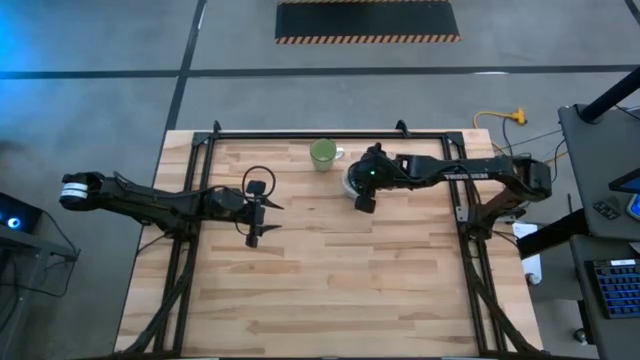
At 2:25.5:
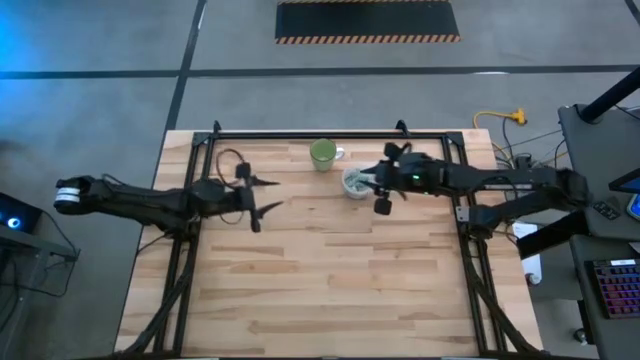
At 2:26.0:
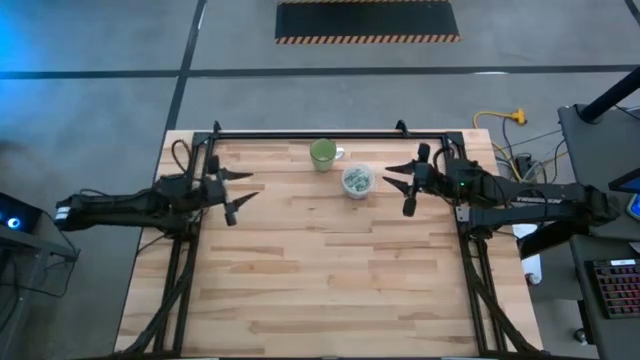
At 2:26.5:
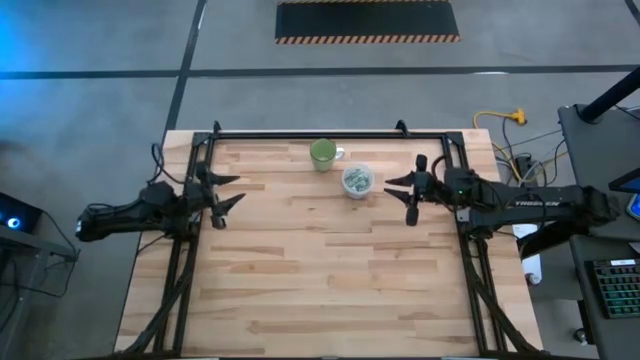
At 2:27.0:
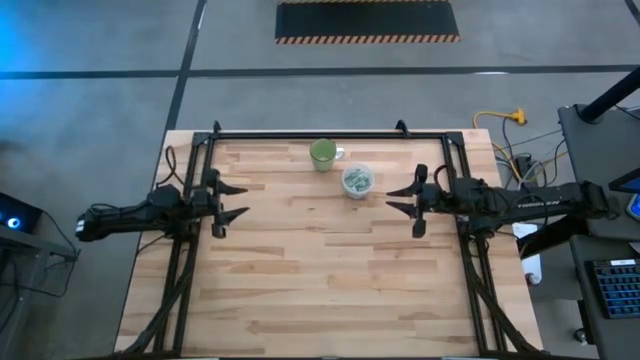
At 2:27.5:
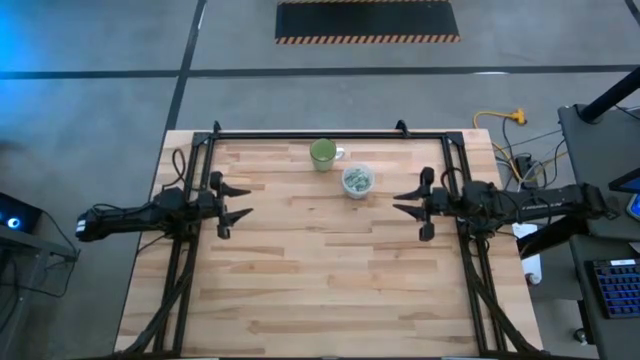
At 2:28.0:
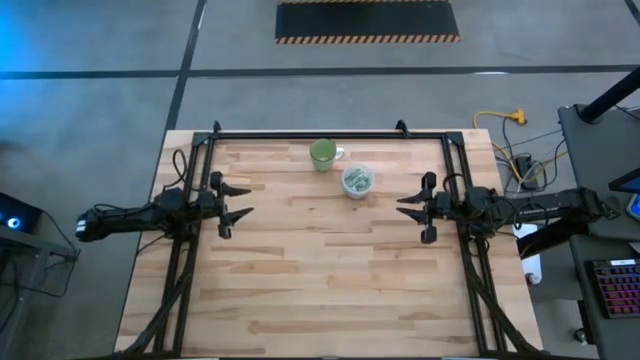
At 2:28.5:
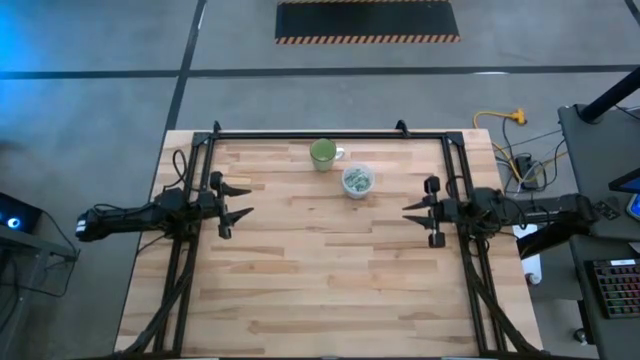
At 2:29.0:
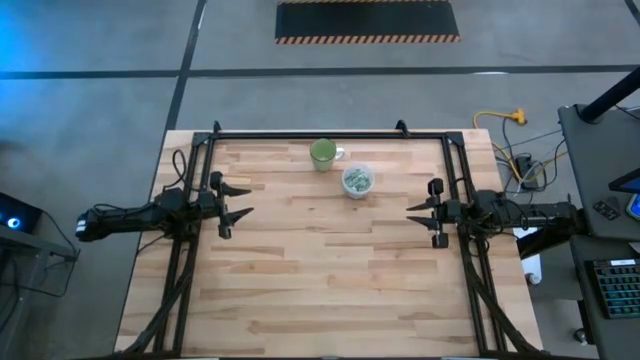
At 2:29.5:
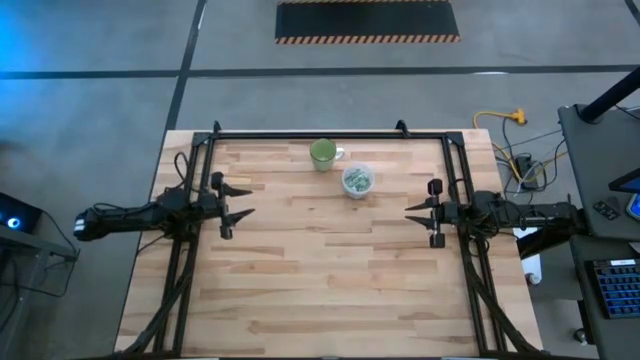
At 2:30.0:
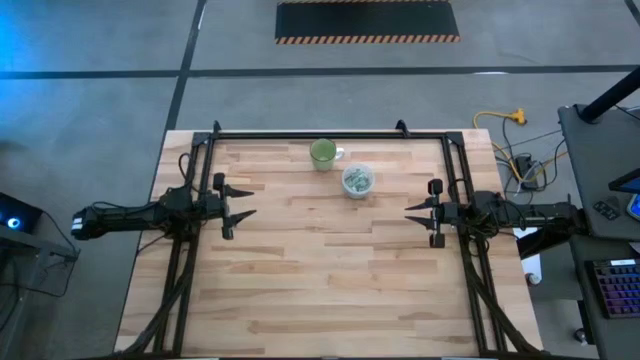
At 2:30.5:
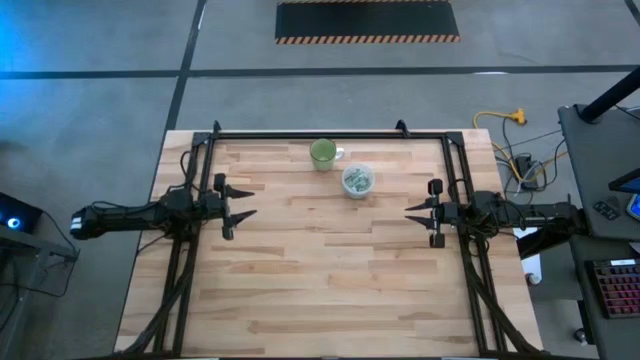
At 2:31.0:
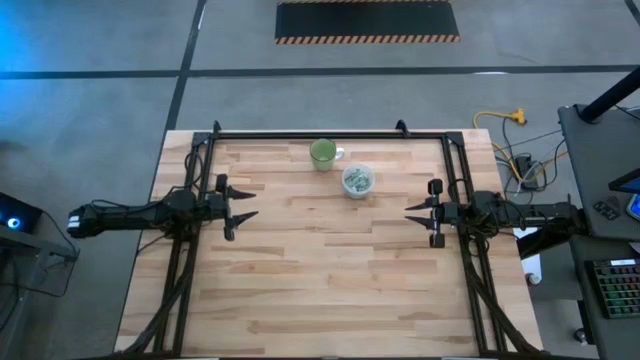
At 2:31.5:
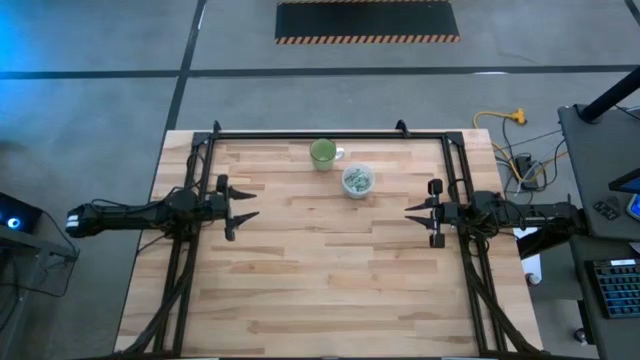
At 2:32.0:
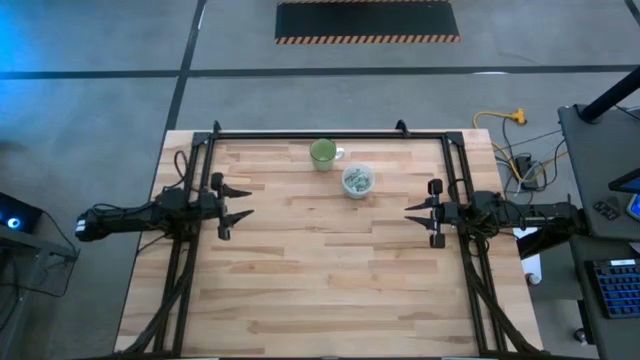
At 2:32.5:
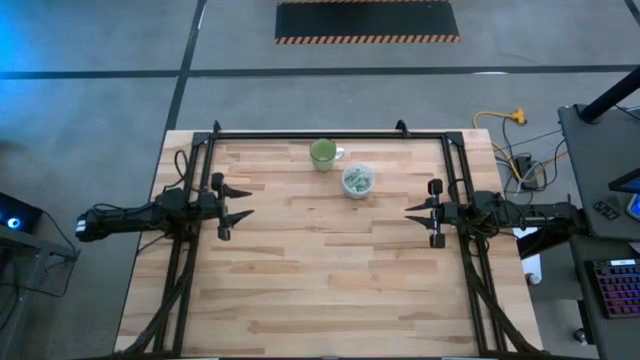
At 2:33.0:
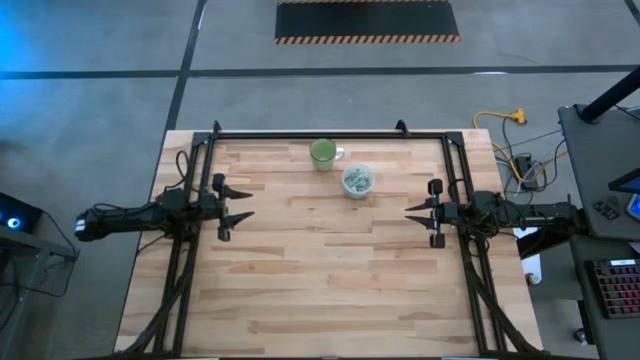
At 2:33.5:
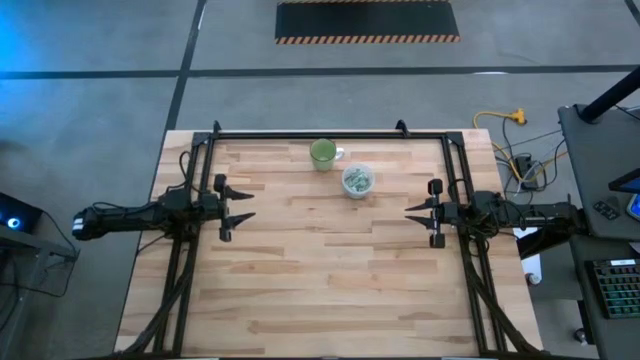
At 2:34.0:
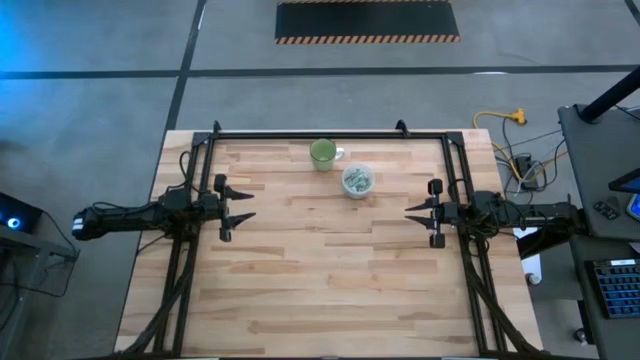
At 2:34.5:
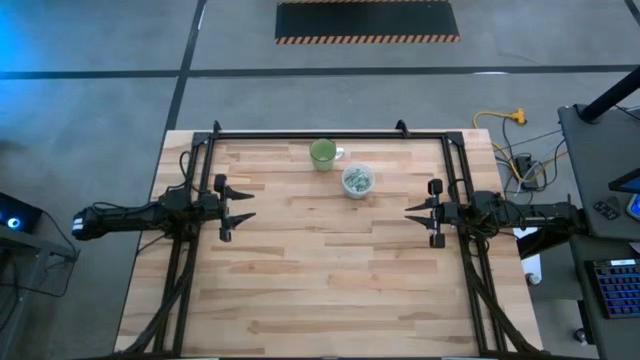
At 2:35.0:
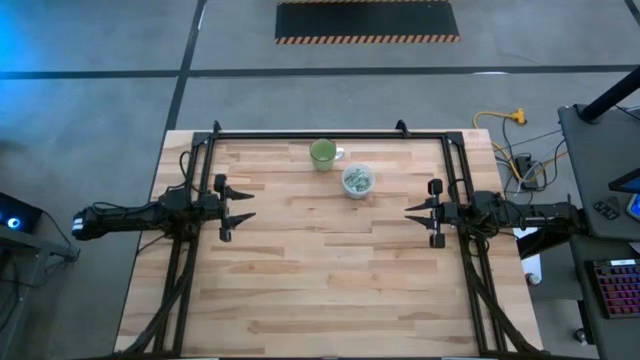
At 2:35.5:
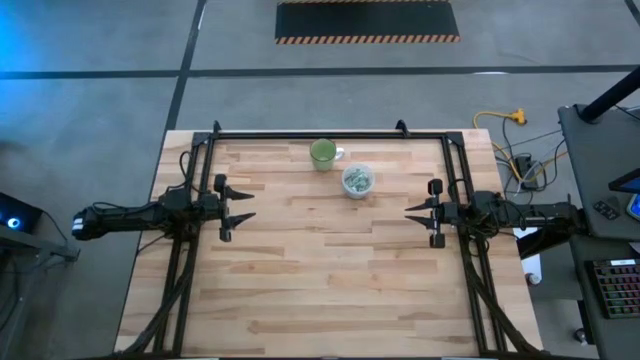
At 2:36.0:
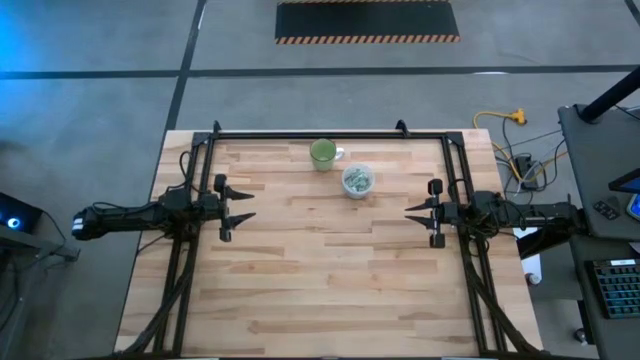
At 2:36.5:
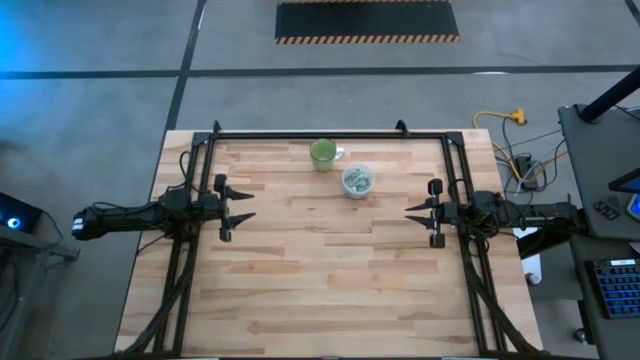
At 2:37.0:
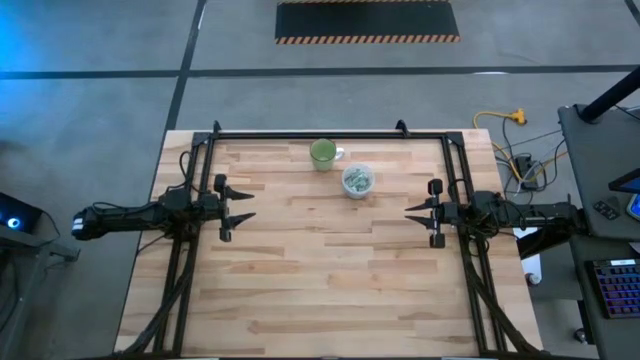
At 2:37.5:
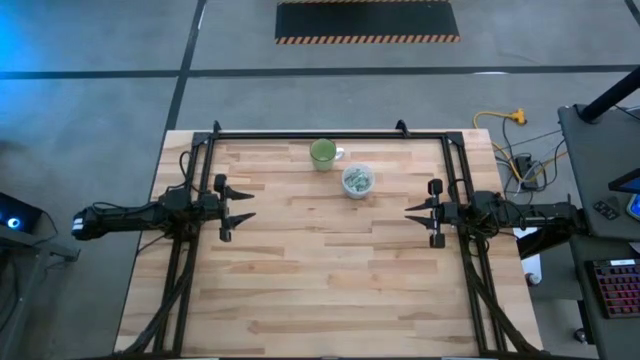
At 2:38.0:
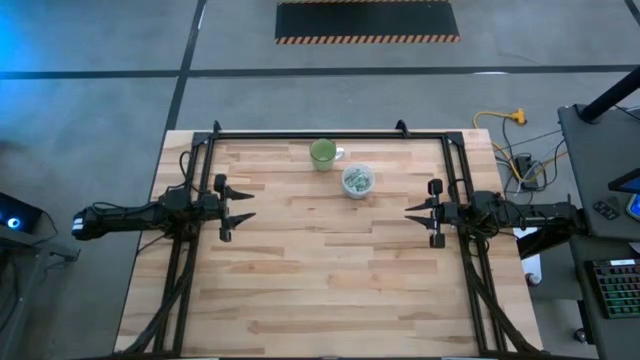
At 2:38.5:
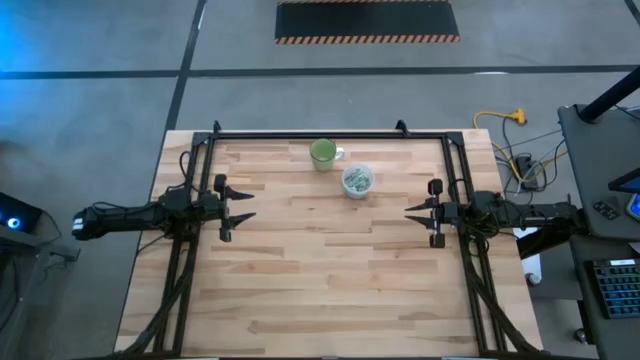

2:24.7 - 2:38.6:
Task: Pick and place Stevia / Truvia into bins
Return to Home Position

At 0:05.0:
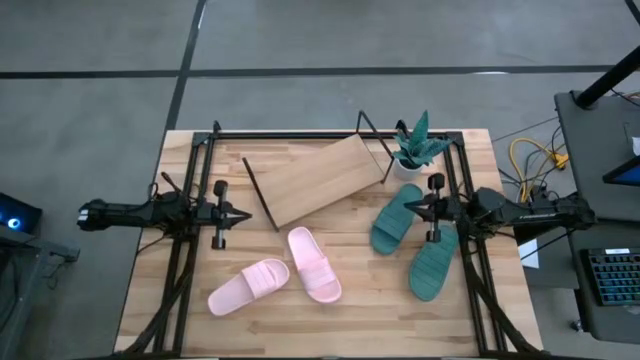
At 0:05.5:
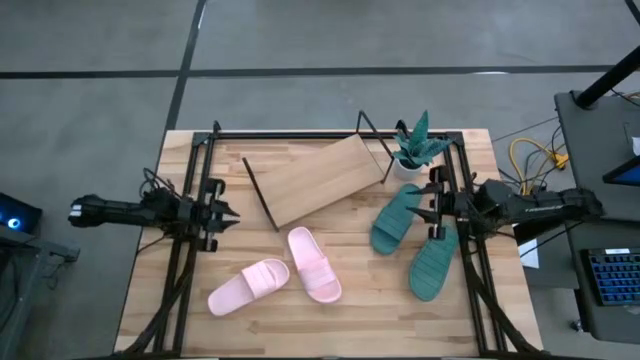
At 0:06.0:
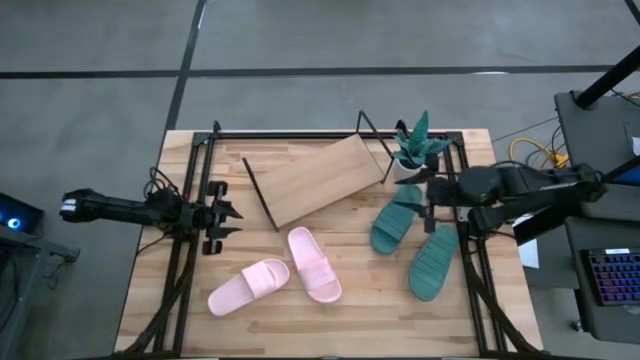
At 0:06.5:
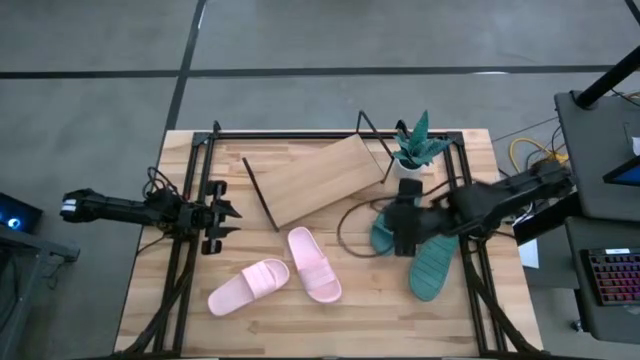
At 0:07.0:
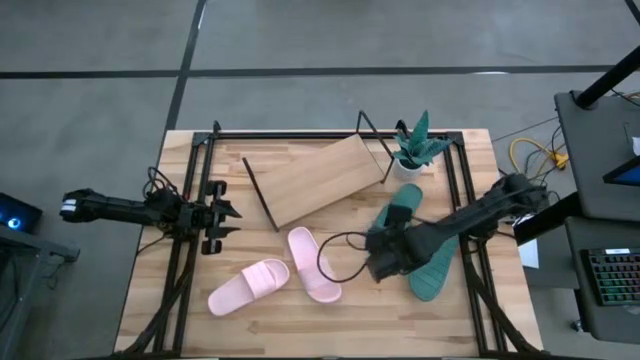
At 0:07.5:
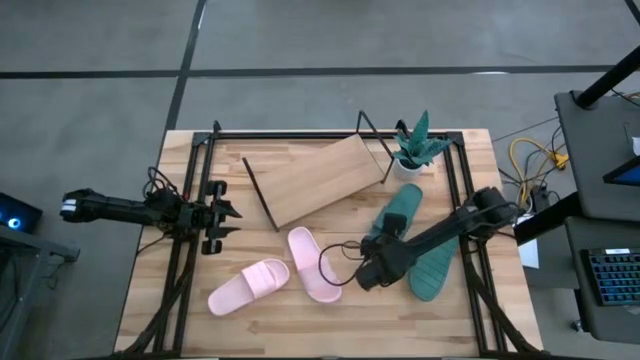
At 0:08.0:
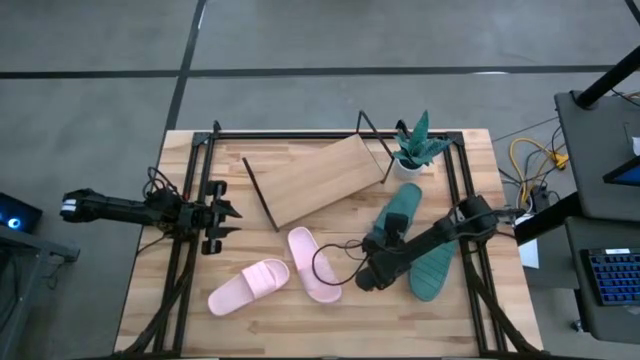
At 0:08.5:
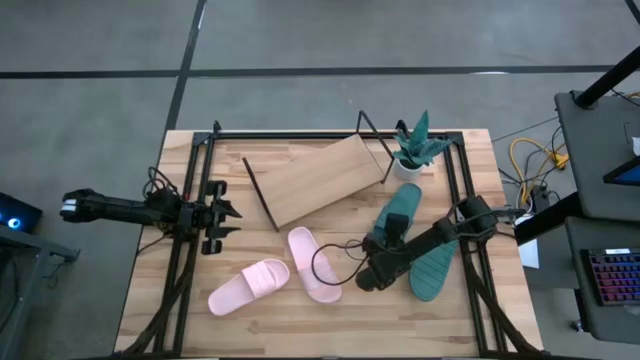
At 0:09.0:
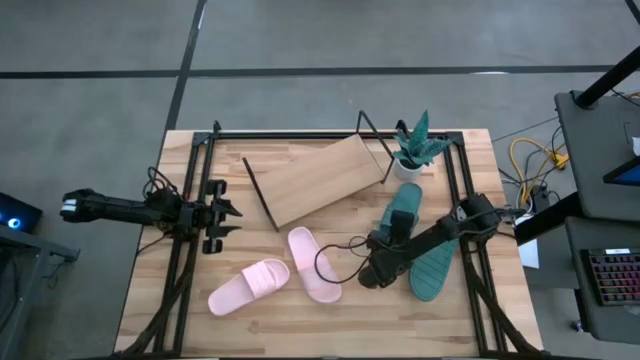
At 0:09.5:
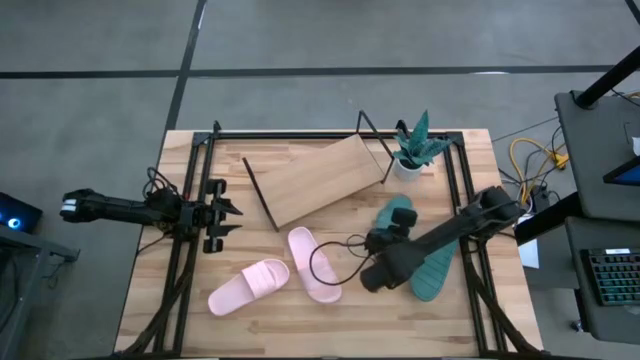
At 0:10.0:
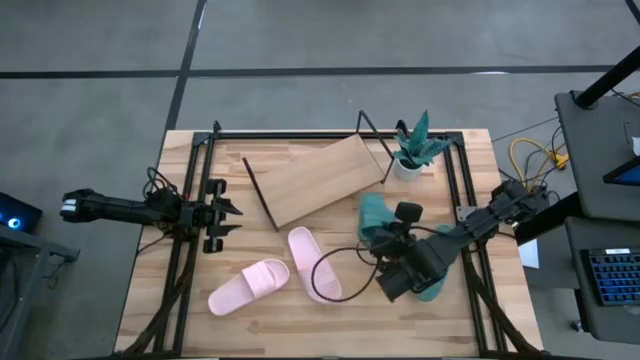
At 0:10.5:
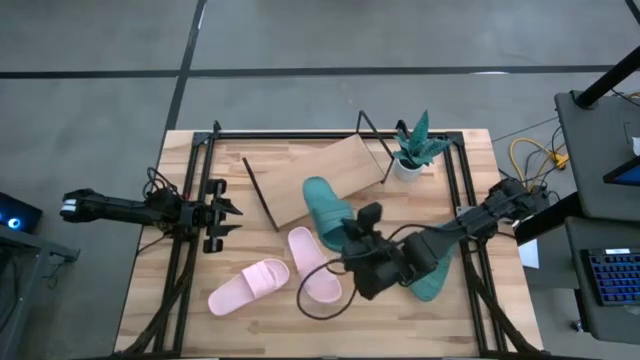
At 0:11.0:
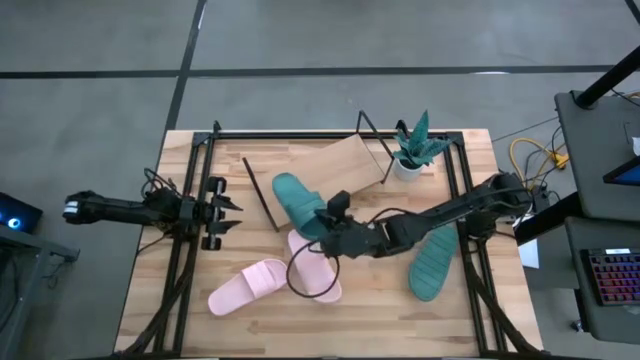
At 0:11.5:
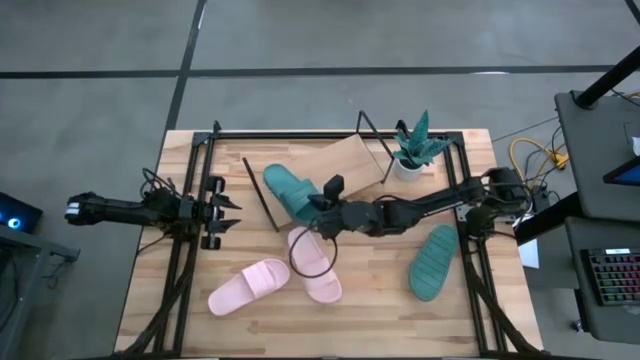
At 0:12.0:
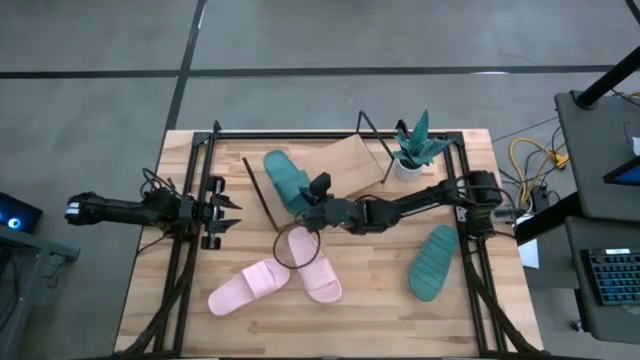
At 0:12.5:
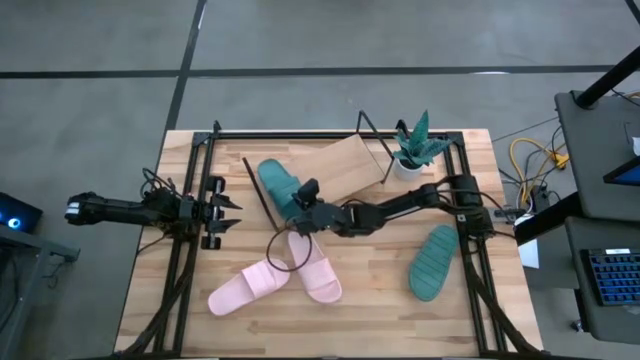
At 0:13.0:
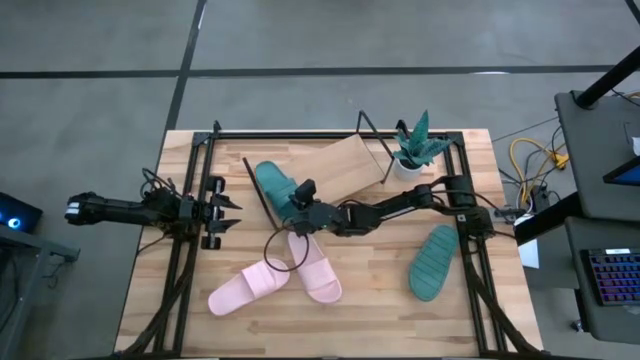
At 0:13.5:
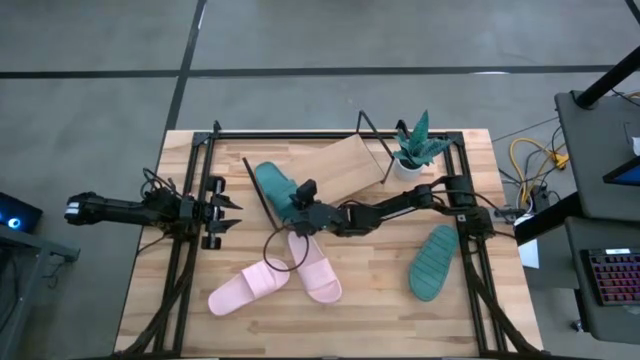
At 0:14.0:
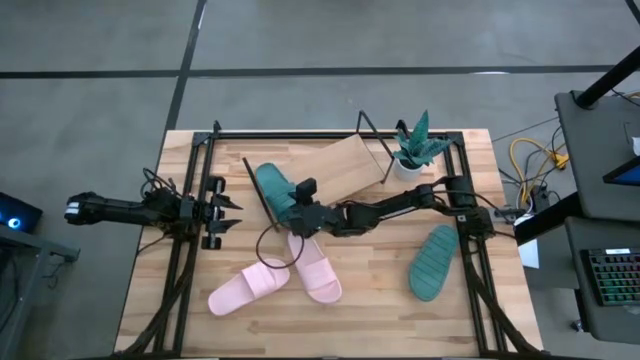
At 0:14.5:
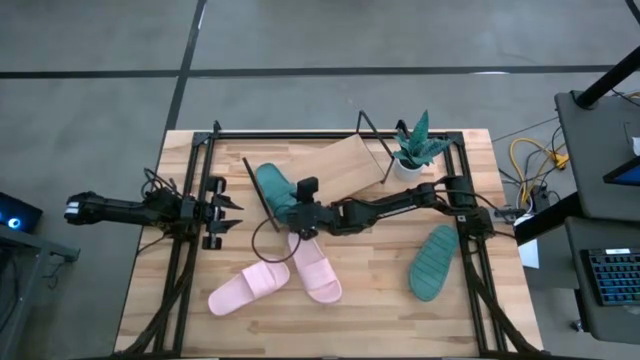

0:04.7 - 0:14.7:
Task: Pick and place slides into the shelf
Put the left green slide on the shelf
